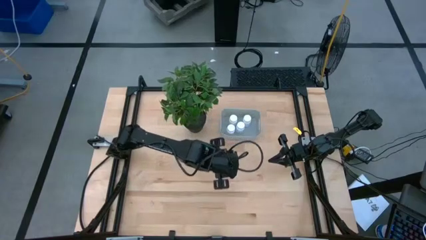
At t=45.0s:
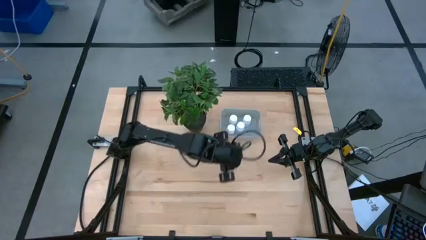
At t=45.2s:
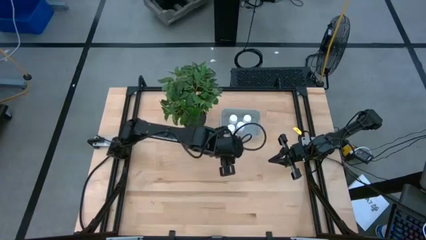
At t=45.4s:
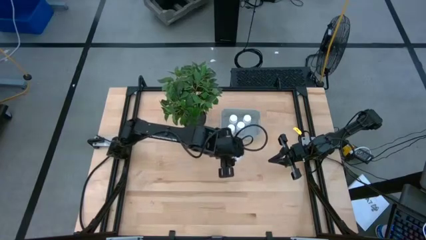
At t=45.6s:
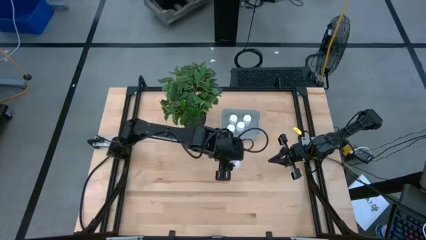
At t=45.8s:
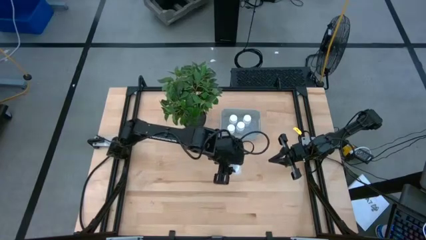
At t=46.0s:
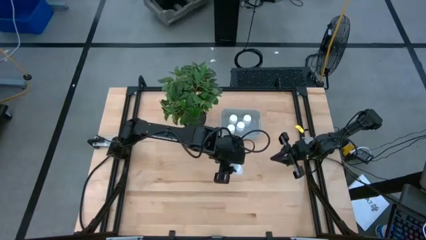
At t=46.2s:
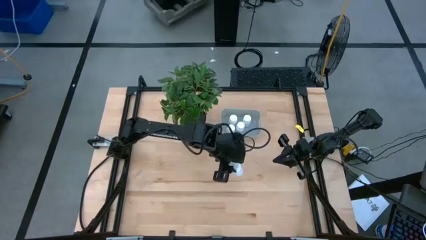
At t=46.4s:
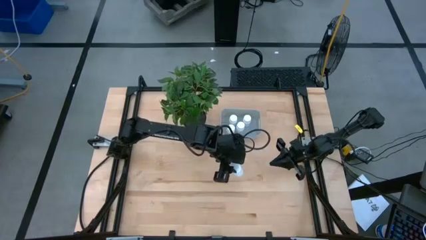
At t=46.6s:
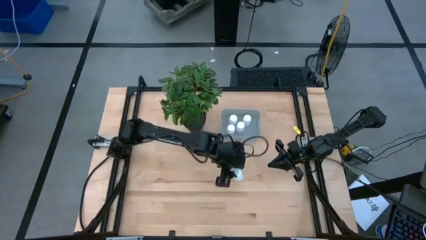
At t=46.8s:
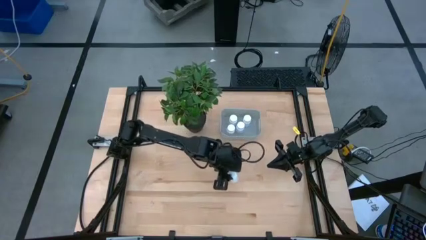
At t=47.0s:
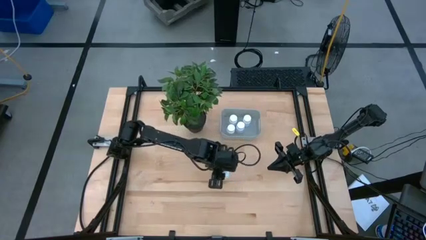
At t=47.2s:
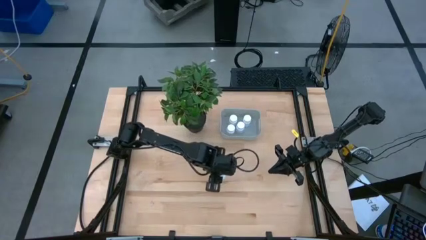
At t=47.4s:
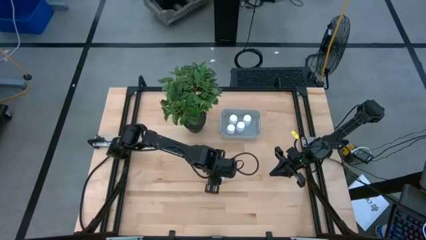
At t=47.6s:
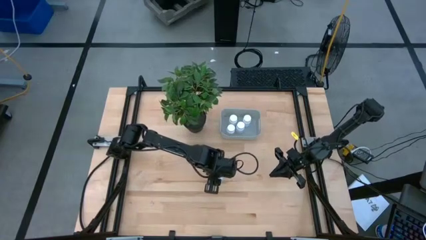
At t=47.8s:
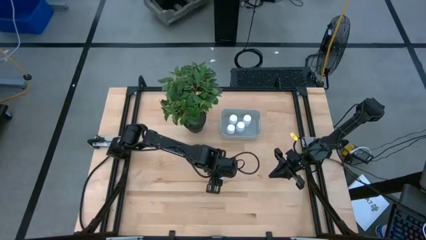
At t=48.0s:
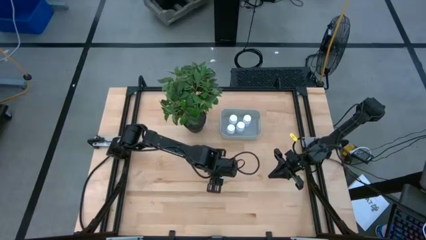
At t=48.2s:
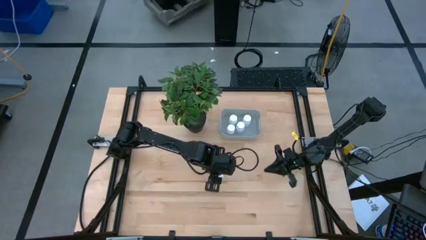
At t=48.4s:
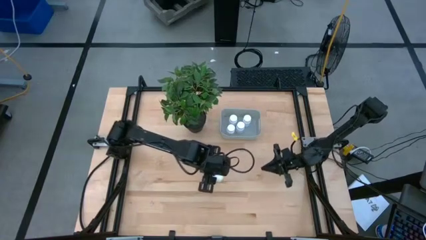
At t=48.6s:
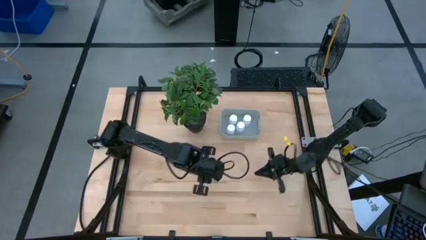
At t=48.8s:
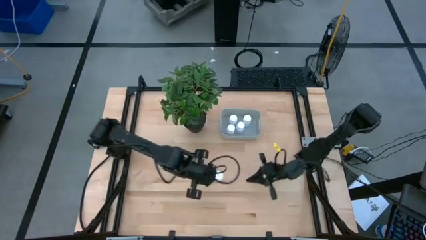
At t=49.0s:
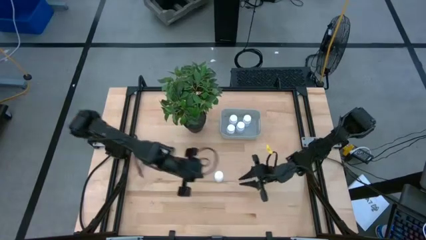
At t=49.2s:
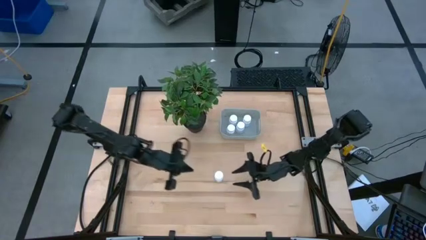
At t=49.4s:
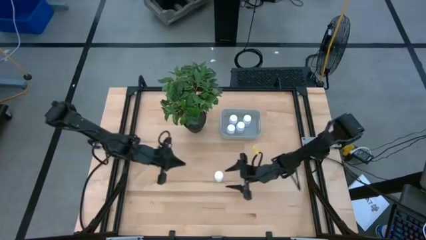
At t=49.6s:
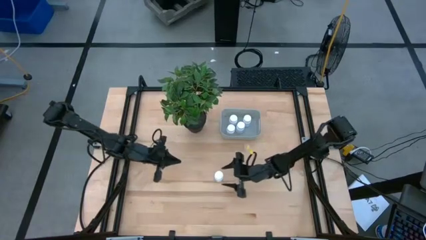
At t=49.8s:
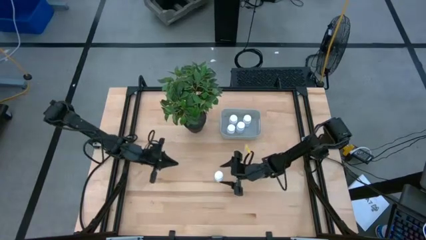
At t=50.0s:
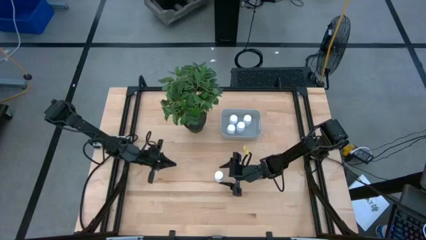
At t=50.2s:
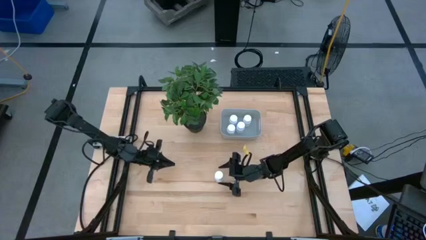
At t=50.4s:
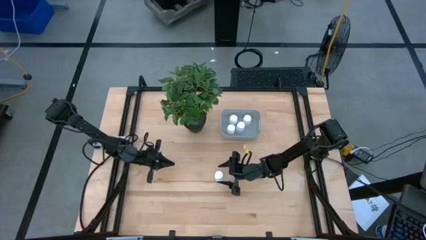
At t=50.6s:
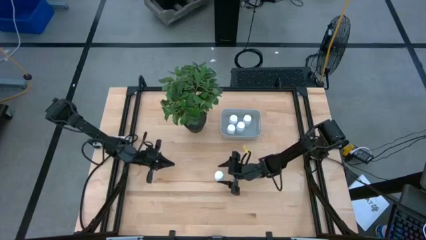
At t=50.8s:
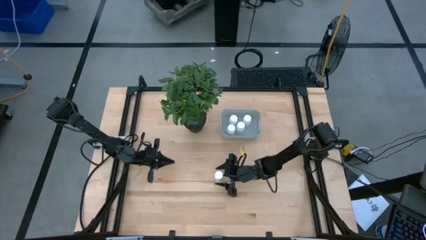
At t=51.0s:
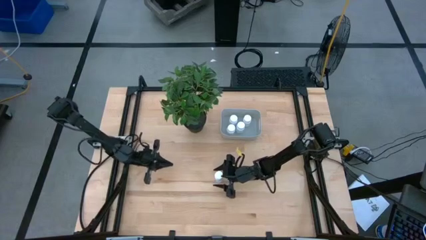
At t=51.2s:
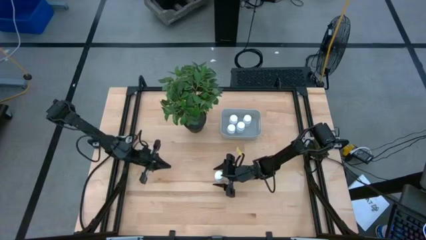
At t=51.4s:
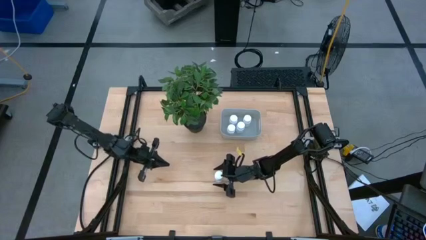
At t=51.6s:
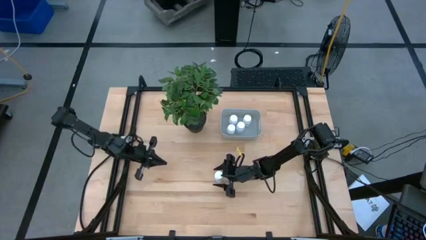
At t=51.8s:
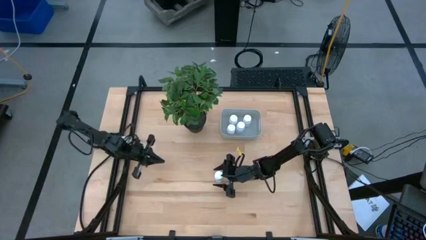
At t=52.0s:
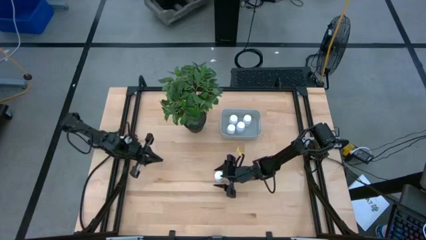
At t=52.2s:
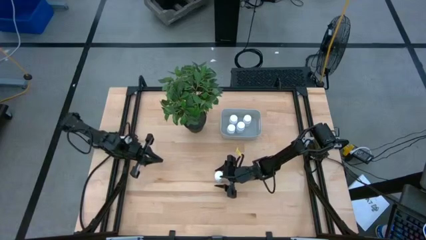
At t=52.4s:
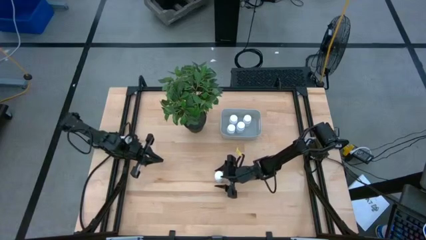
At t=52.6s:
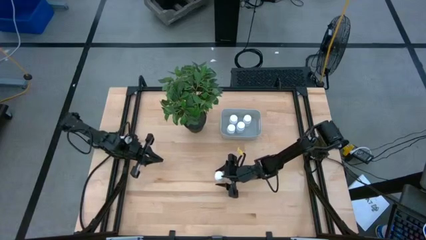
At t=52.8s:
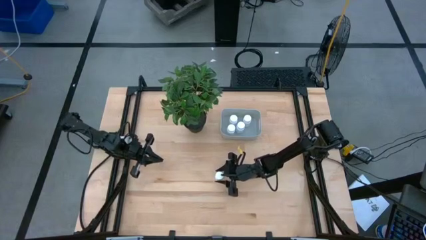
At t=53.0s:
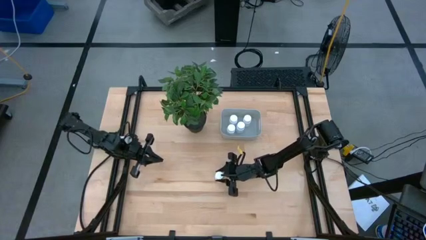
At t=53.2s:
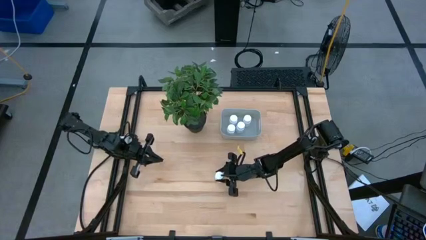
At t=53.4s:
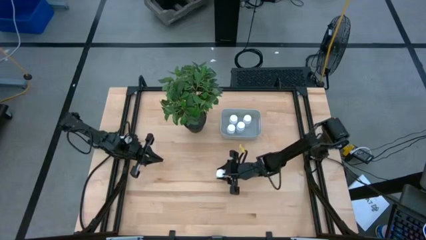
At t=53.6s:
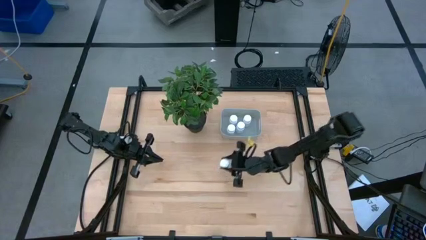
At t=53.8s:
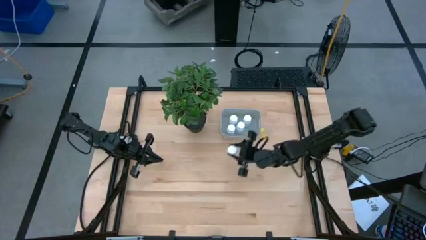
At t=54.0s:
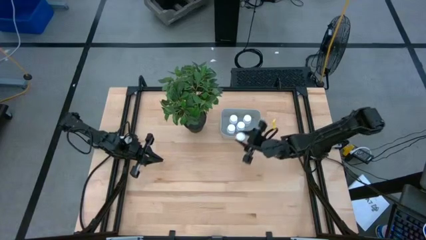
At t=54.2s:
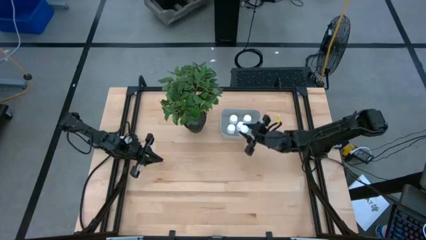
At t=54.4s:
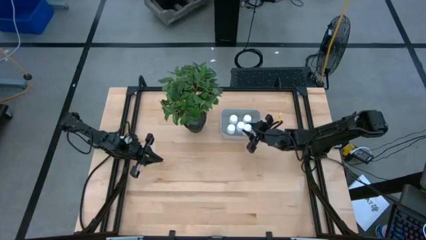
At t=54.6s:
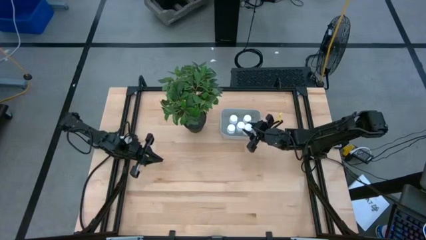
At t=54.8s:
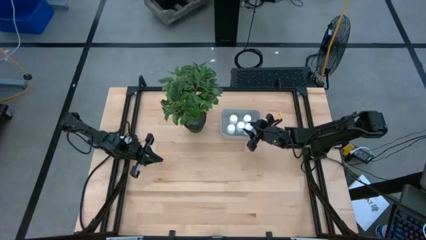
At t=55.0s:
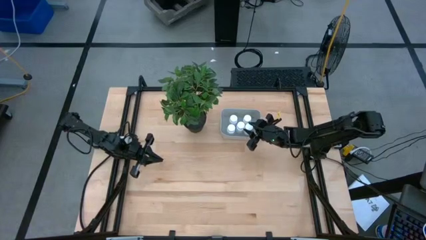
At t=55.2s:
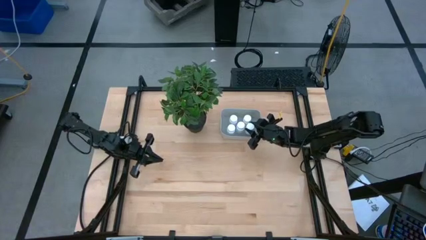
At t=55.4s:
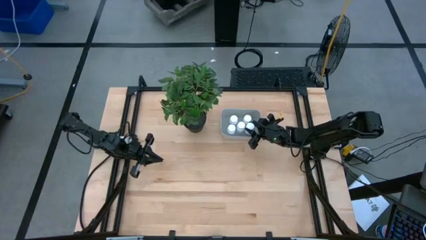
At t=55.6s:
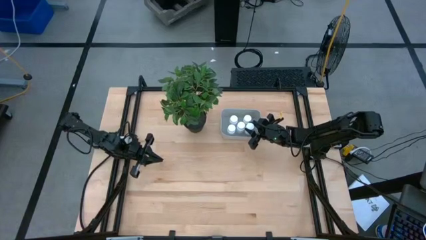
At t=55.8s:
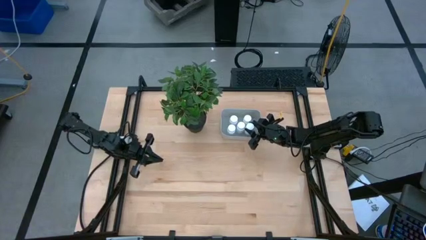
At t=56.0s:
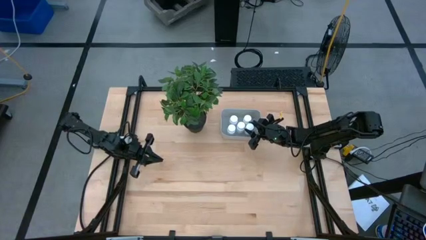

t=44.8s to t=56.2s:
Task: Pick and place pill bottles into a basket
Put the white pill bottle into the gray bin

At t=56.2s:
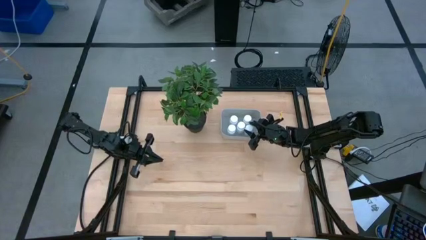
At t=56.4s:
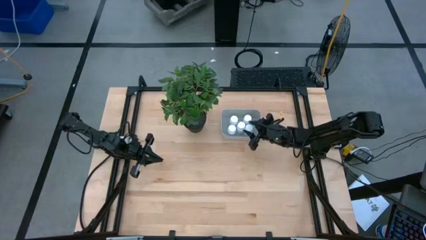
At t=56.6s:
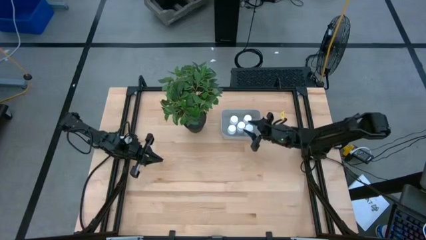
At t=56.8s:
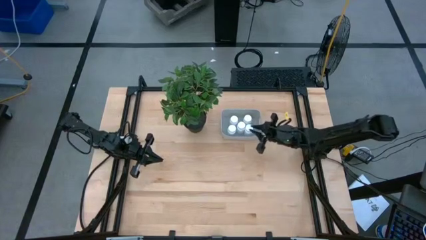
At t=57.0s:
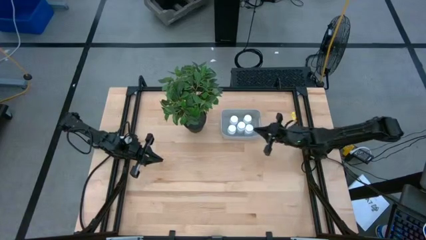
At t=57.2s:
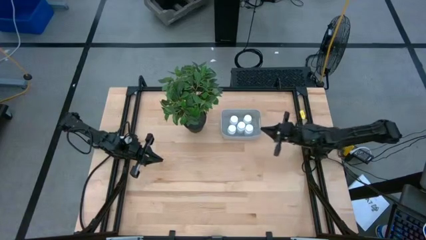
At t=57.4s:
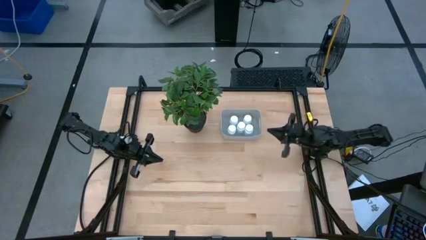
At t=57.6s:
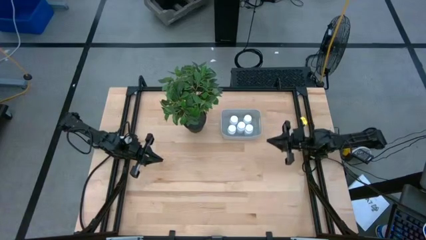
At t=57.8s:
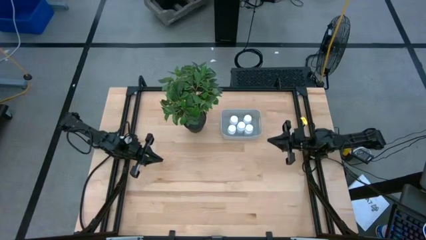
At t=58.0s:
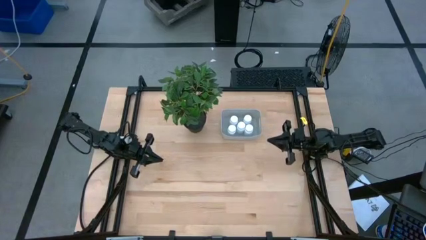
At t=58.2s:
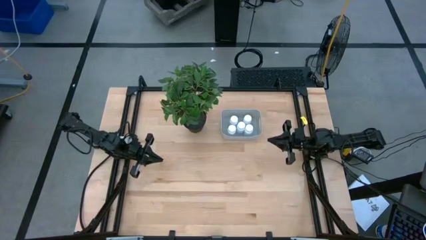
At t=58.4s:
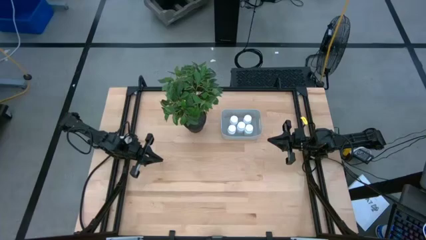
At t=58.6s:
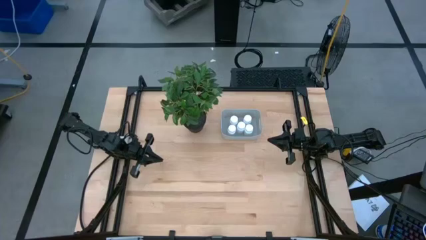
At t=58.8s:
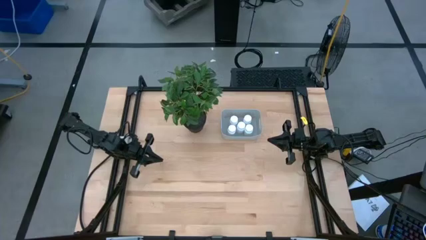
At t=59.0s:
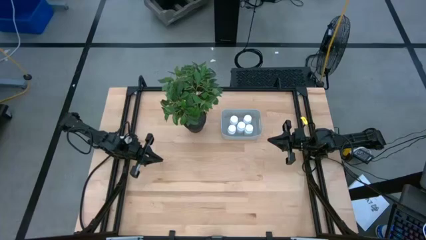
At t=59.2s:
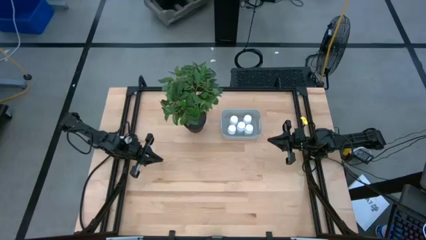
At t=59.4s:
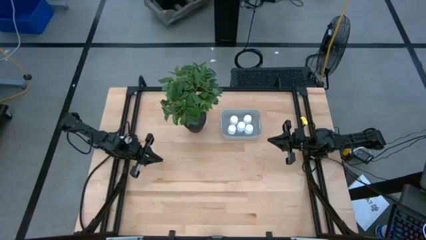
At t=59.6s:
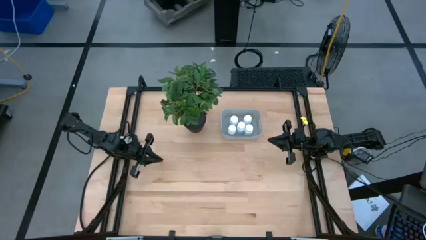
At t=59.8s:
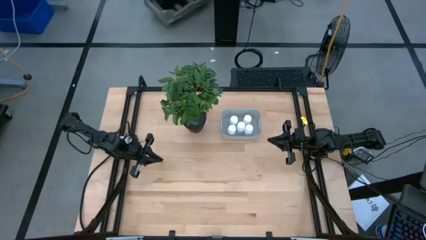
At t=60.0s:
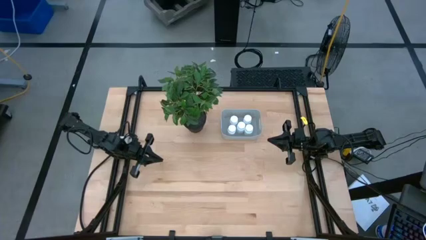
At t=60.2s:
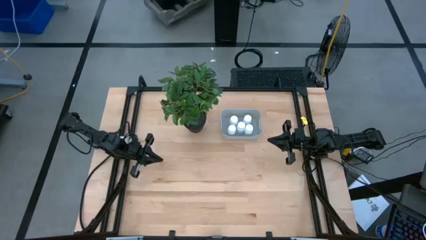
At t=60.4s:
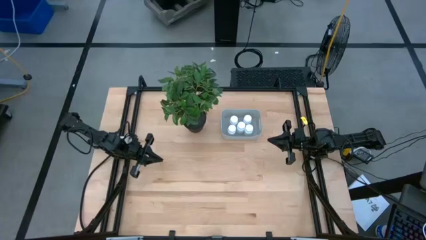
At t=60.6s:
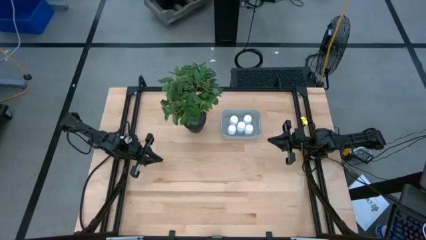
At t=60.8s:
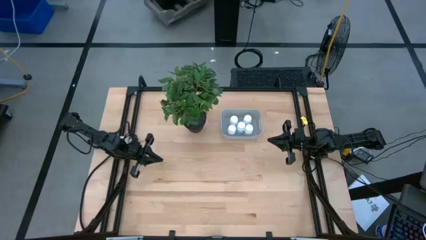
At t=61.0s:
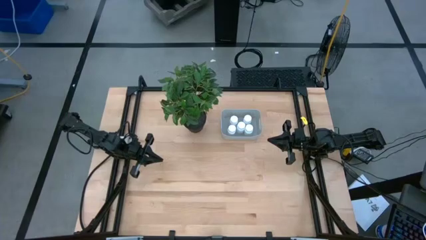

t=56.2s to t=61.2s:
Return to Home Position
